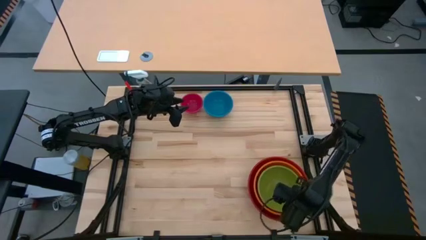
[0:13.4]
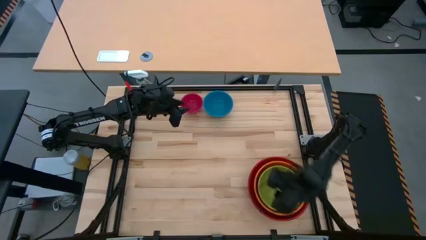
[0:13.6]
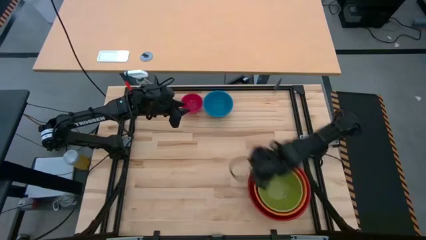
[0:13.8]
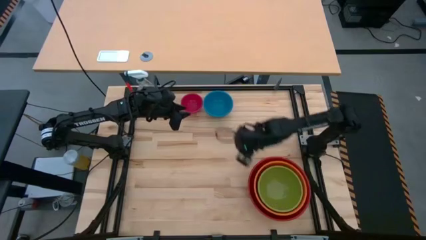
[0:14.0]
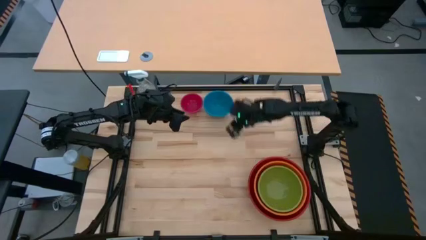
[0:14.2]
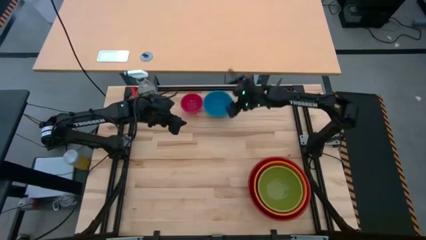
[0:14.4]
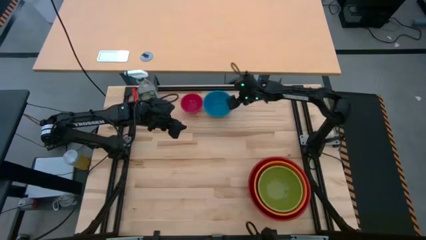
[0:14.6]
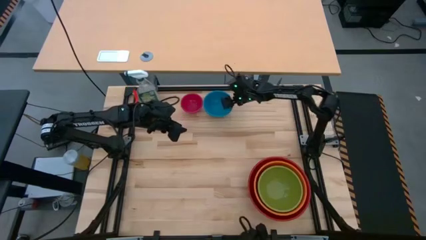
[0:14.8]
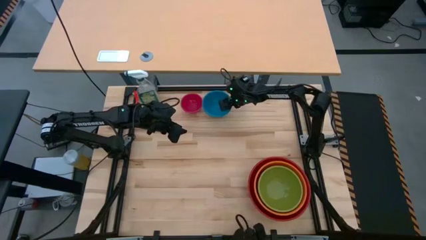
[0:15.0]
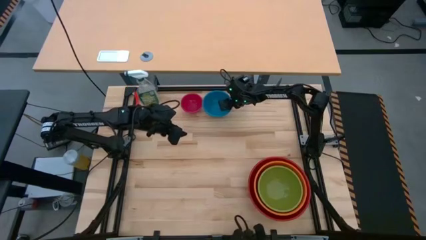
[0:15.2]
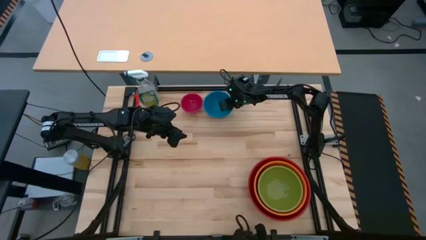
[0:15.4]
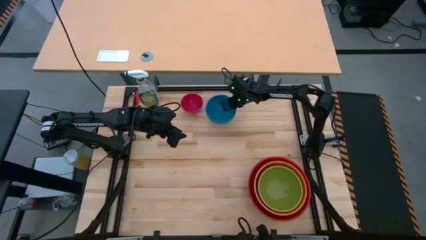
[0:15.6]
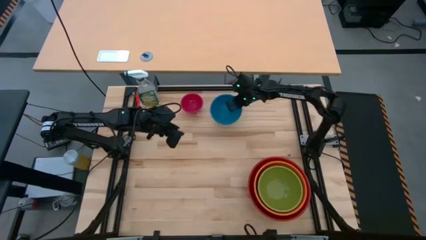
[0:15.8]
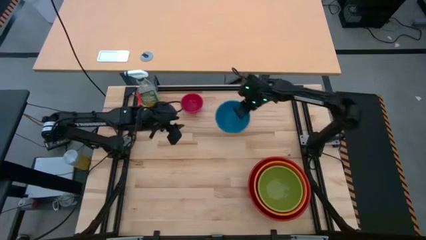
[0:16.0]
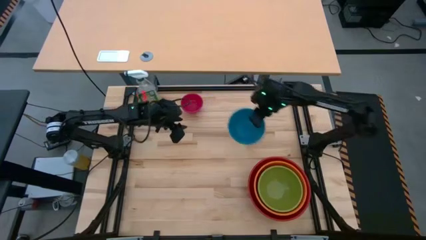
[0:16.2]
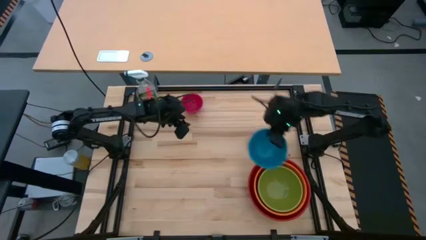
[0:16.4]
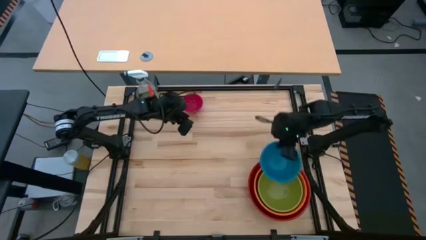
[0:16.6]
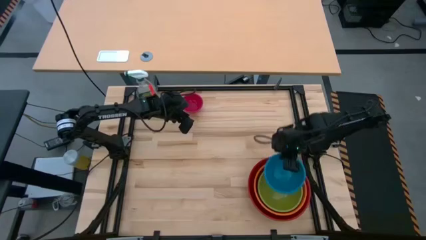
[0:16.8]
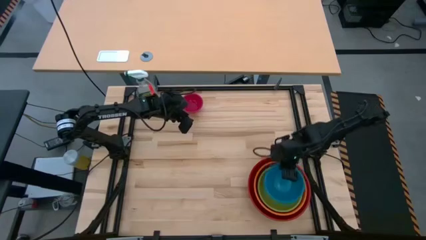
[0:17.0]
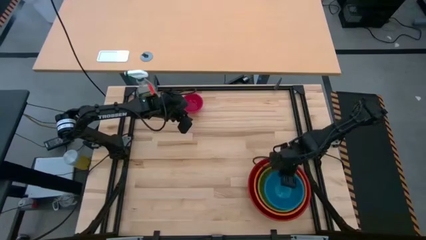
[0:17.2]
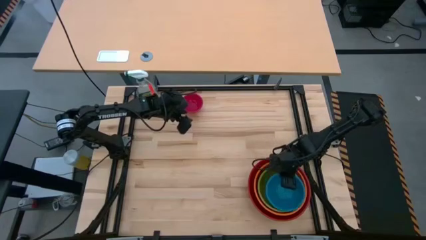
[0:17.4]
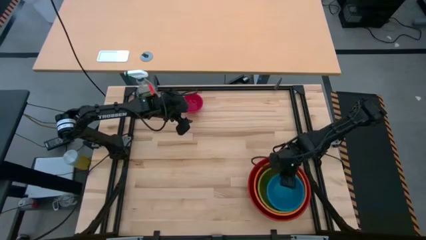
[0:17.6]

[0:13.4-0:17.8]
Stack the blue bowl on top of the green bowl

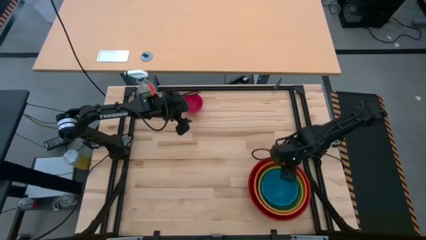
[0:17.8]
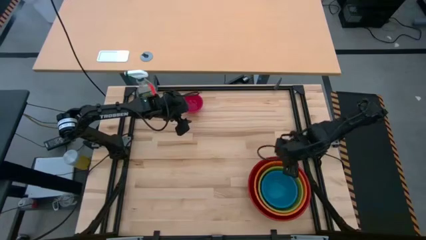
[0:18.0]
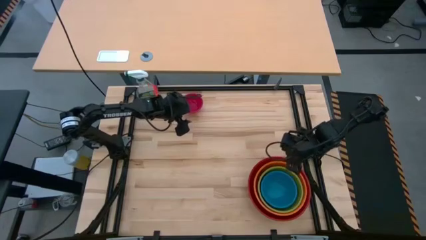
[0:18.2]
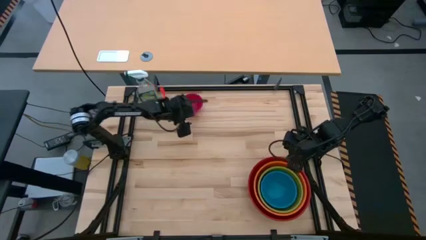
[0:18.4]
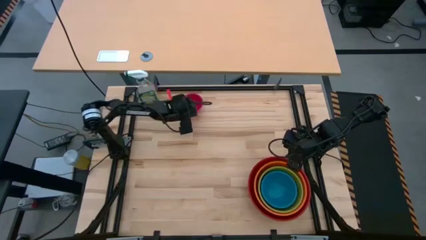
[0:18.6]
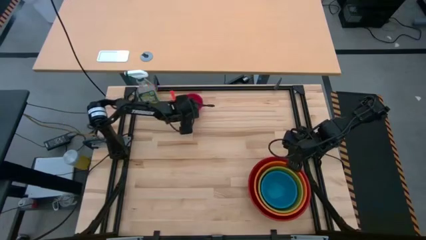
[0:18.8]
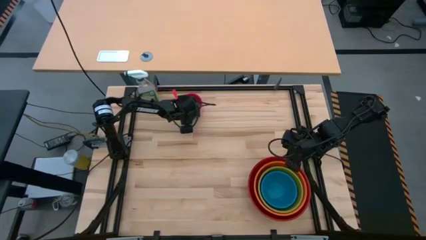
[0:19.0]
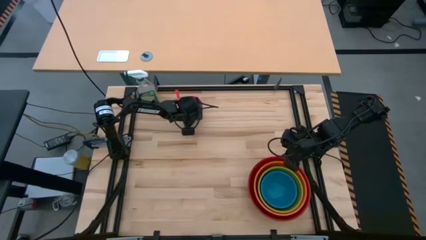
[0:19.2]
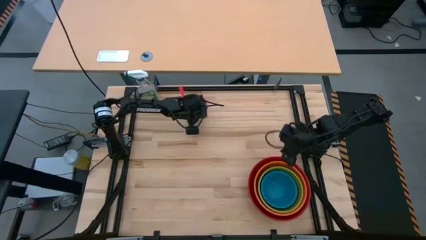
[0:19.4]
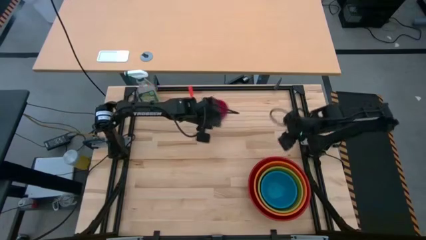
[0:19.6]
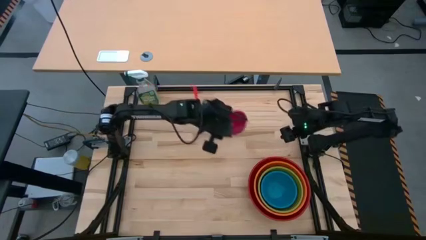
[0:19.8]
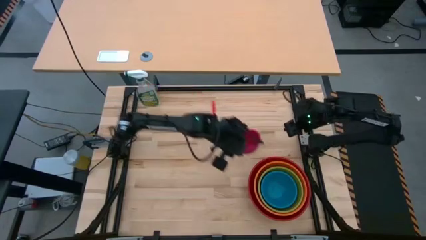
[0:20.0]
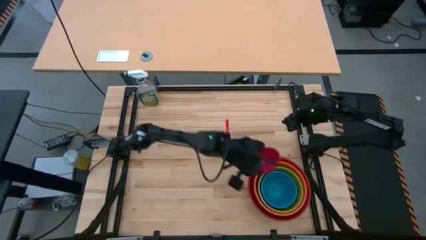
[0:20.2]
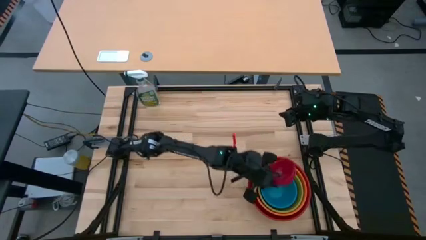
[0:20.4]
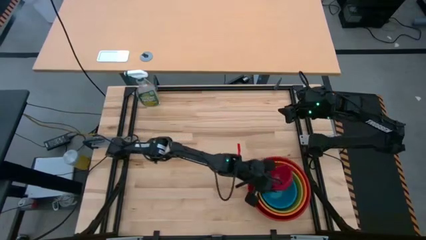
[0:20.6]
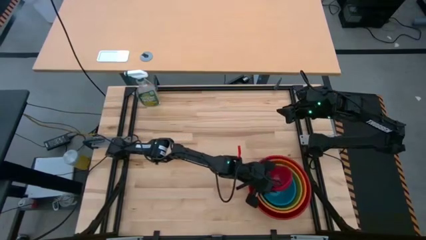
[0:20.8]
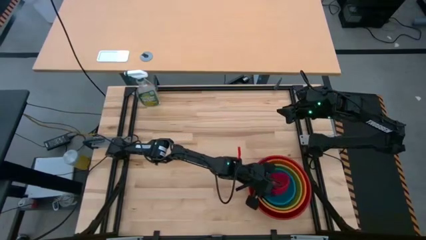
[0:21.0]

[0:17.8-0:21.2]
Stack the pink bowl on top of the blue bowl

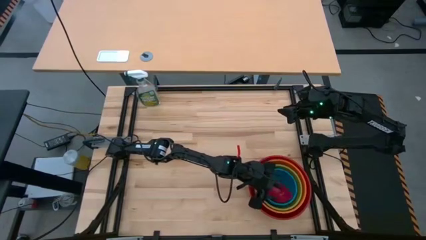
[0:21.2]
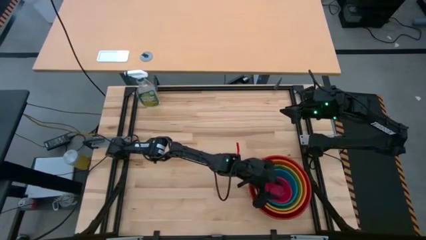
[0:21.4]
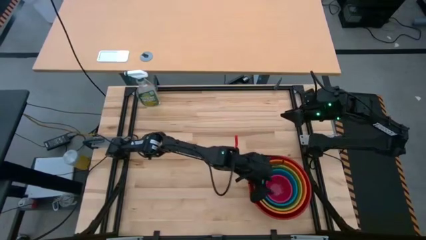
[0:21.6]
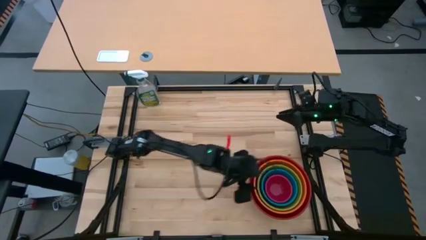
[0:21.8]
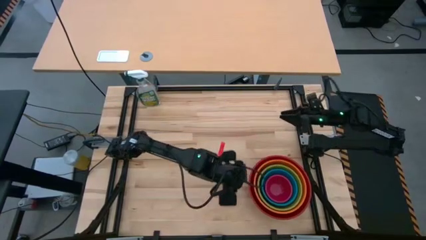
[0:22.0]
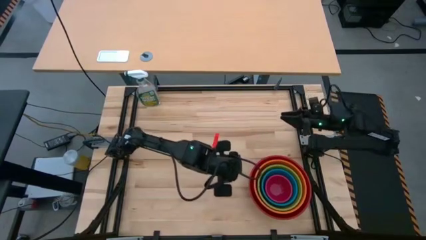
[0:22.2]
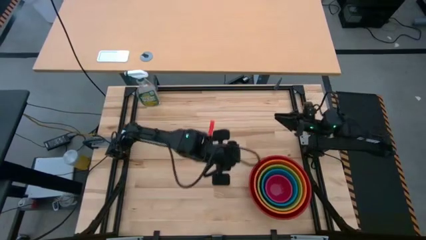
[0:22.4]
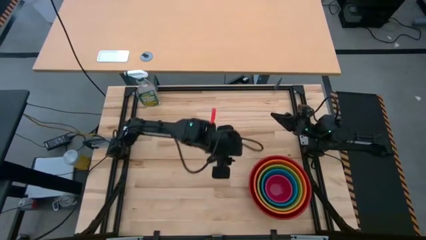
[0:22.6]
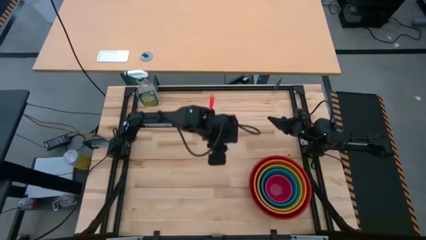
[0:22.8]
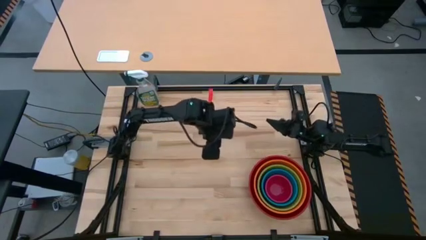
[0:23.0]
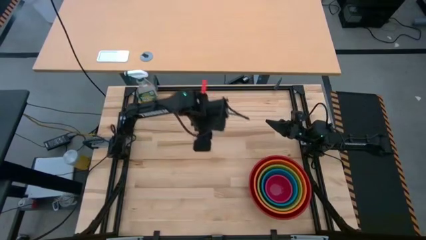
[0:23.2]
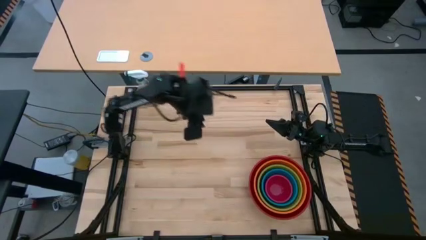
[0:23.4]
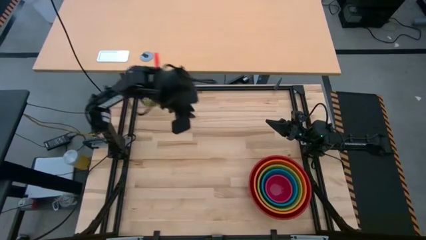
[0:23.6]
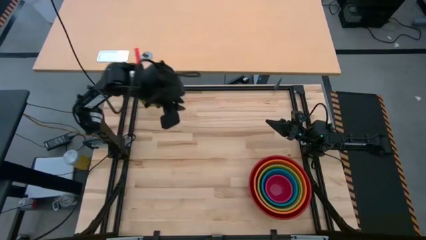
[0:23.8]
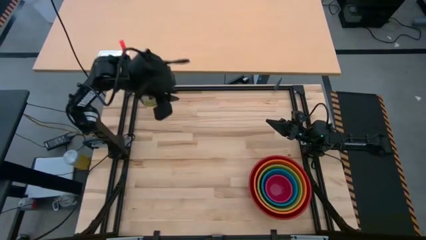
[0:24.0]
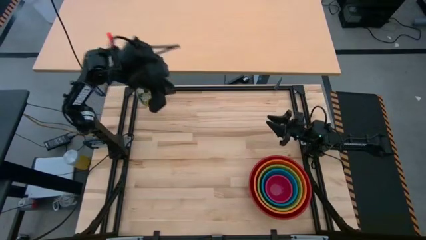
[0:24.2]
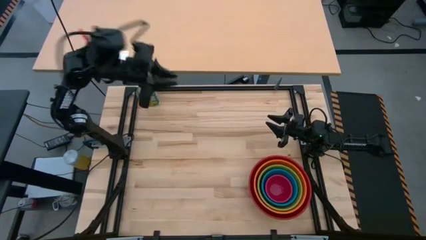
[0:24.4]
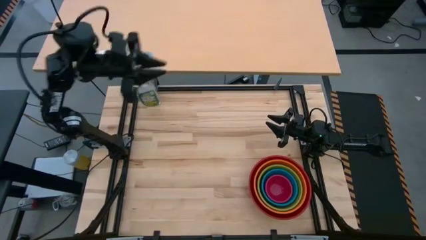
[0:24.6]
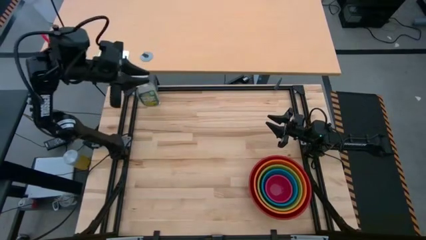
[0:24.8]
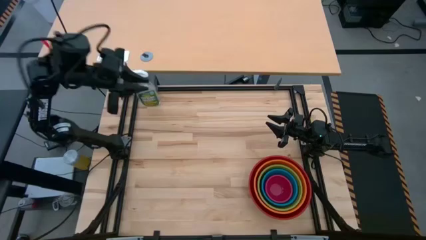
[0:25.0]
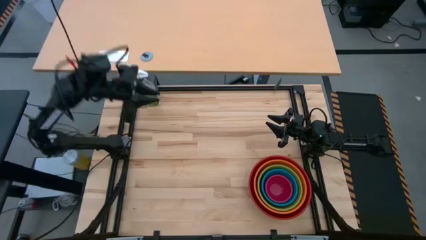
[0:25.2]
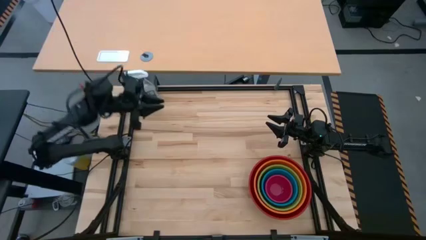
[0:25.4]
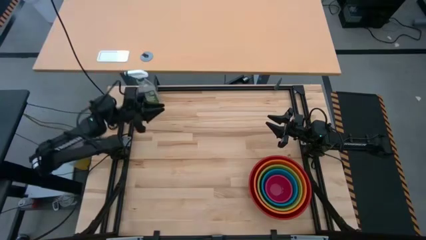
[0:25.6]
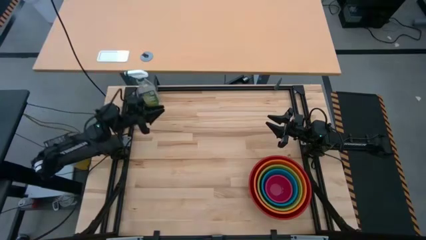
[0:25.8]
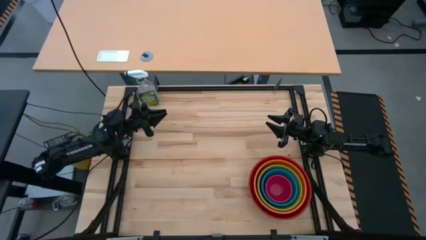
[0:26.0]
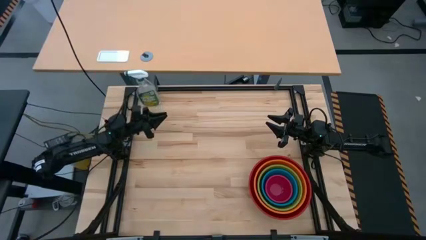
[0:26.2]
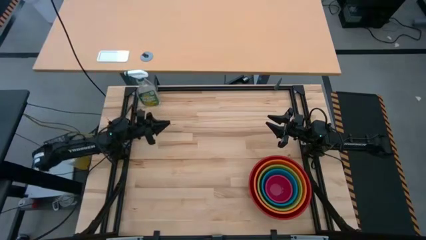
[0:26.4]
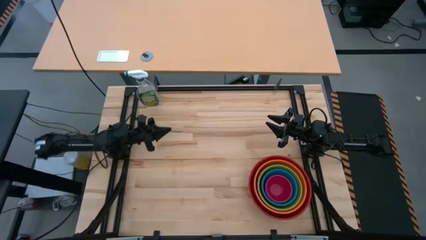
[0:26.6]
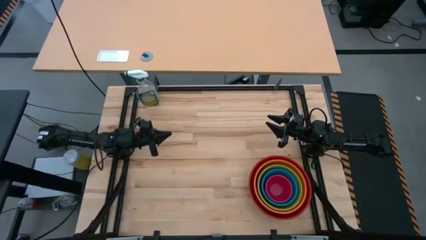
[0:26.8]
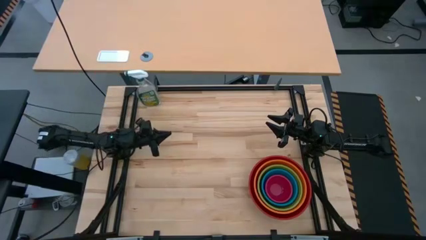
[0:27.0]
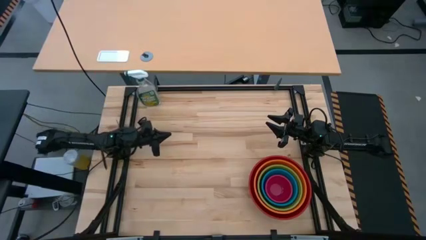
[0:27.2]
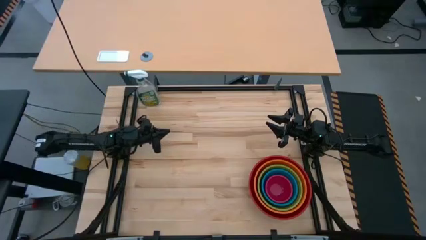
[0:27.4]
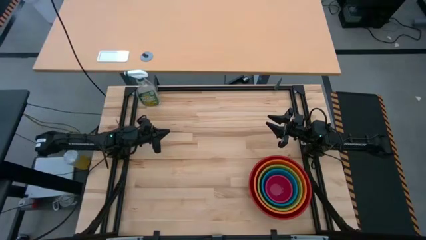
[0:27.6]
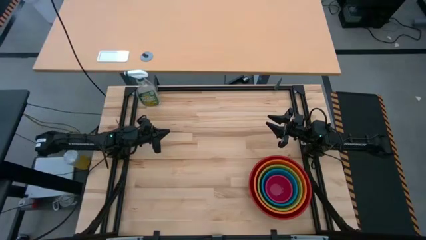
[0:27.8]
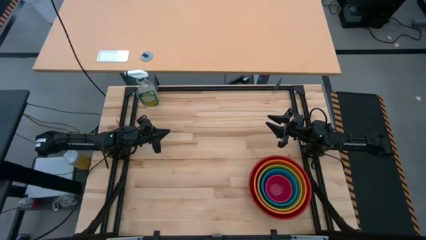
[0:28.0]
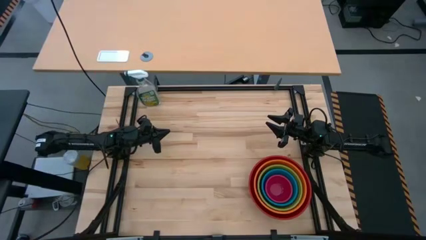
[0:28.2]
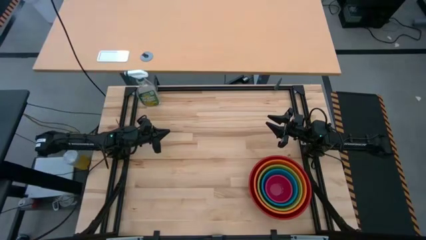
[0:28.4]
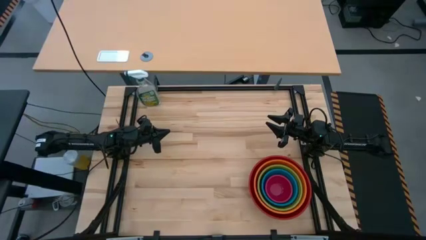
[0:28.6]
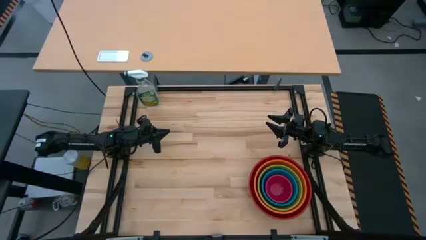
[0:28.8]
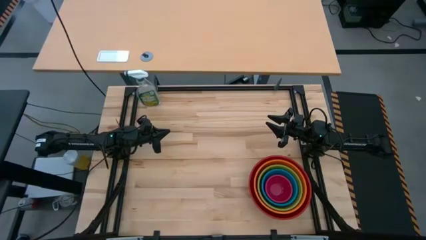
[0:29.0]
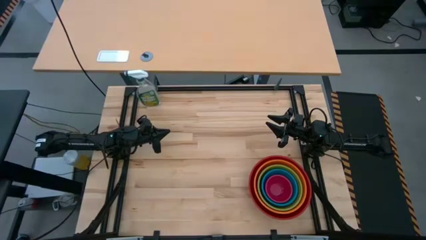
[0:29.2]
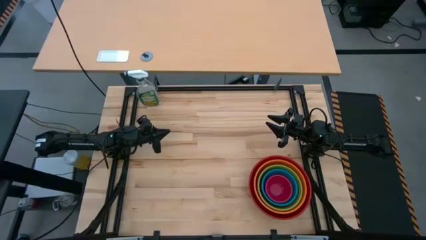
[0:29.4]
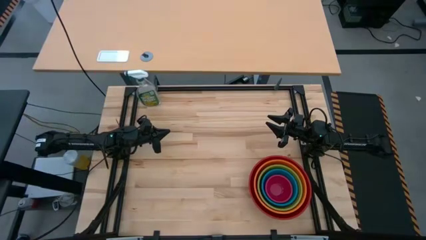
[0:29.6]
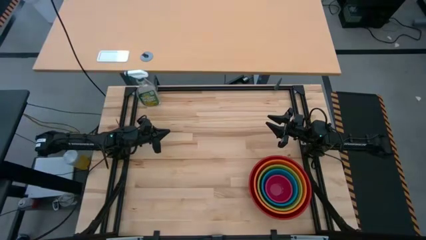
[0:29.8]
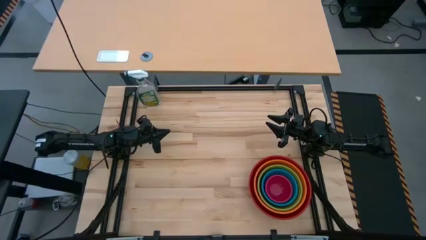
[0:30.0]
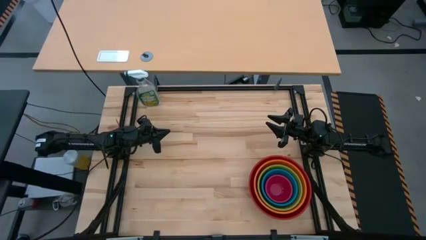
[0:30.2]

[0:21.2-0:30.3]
Return to Home Position
